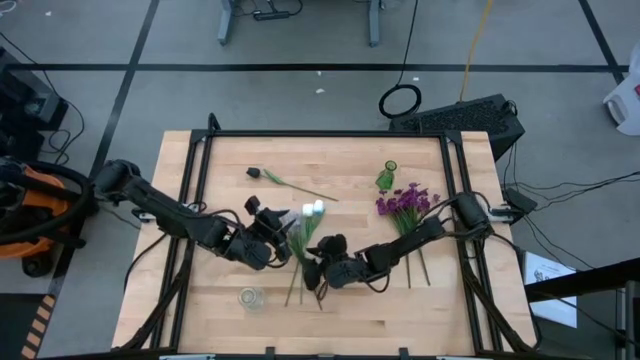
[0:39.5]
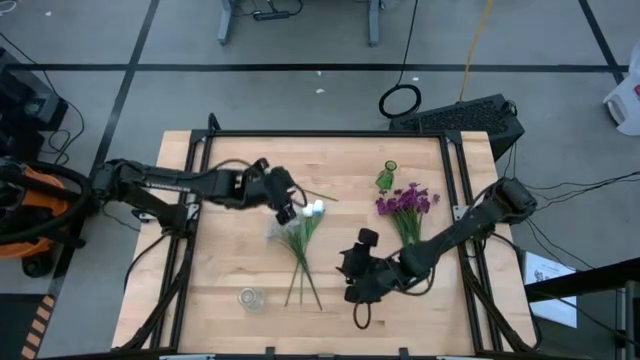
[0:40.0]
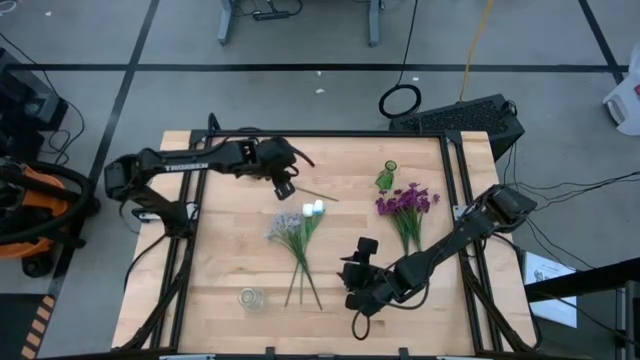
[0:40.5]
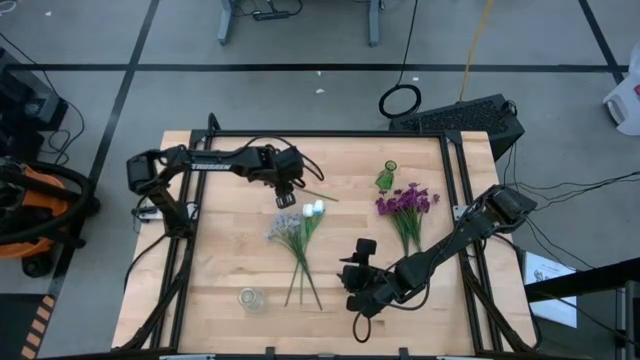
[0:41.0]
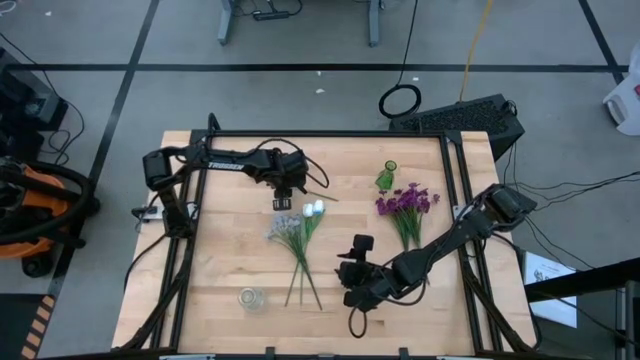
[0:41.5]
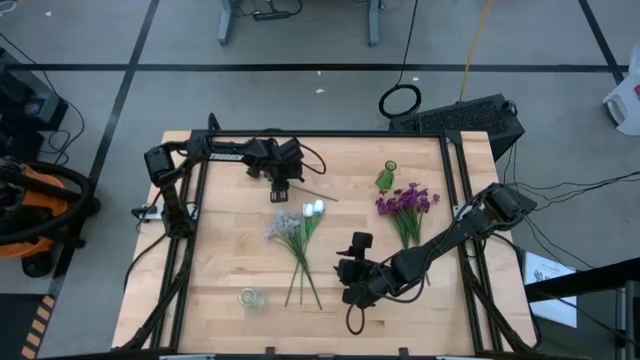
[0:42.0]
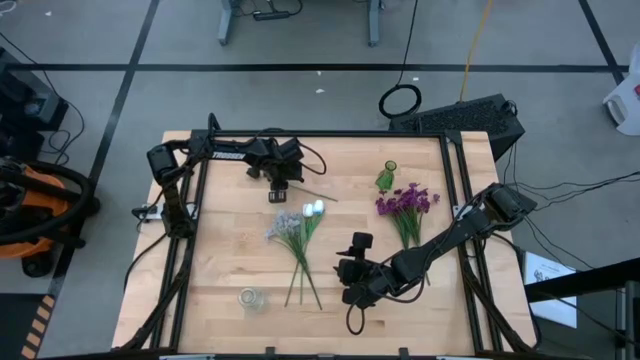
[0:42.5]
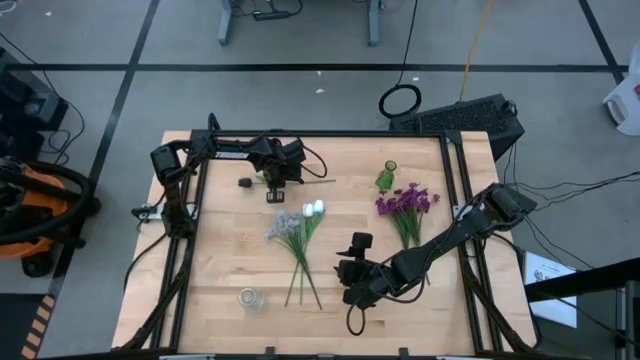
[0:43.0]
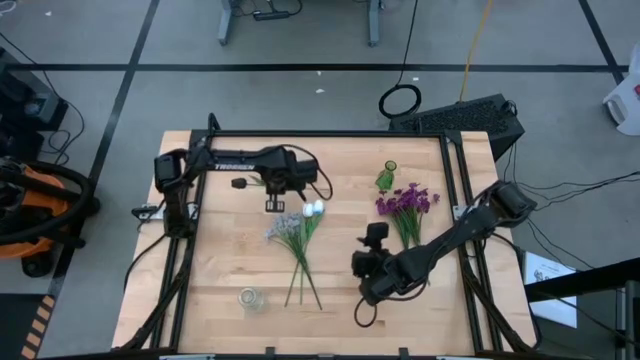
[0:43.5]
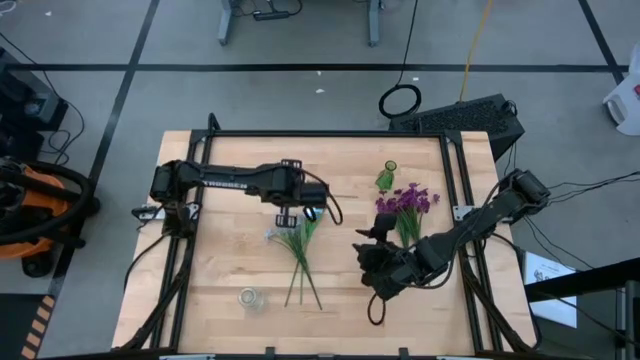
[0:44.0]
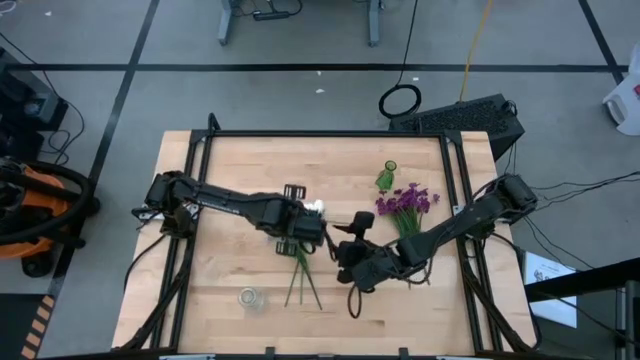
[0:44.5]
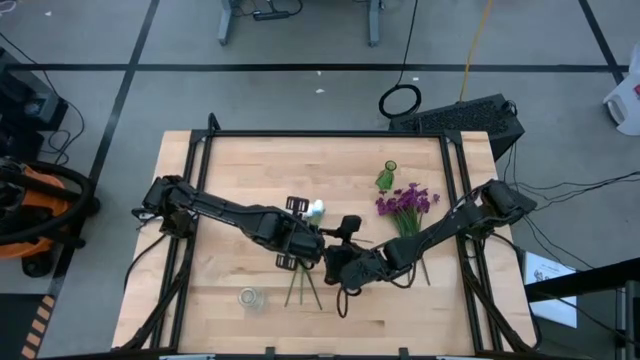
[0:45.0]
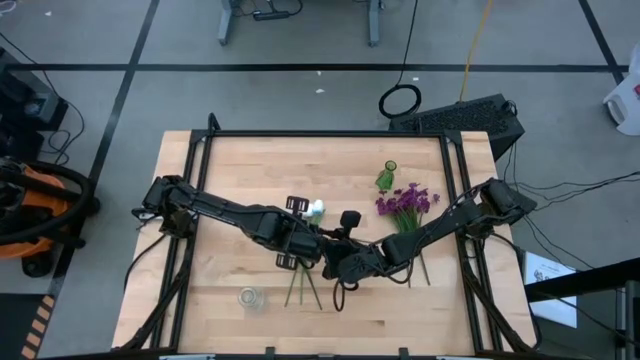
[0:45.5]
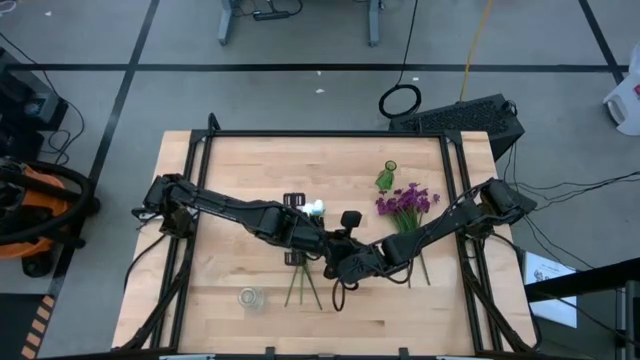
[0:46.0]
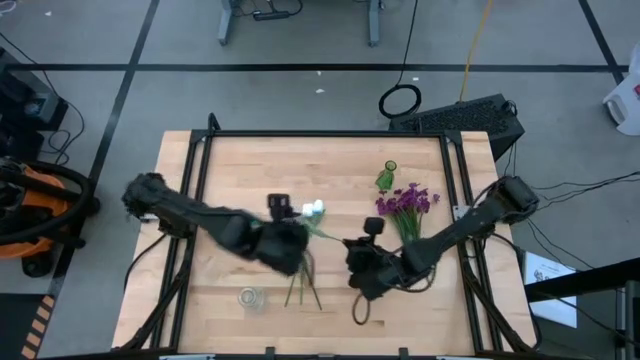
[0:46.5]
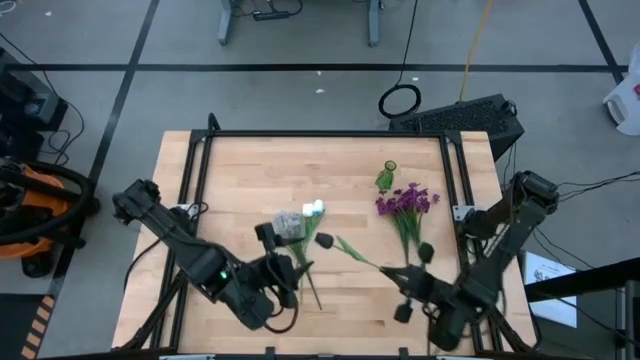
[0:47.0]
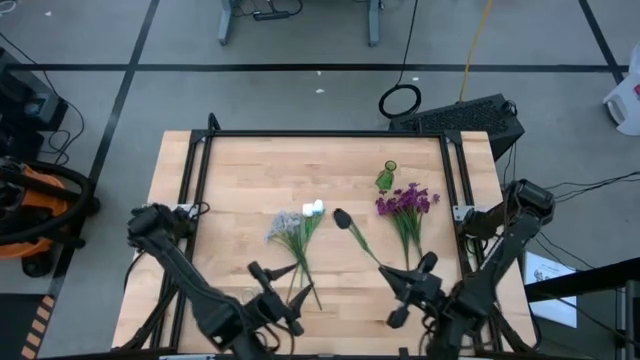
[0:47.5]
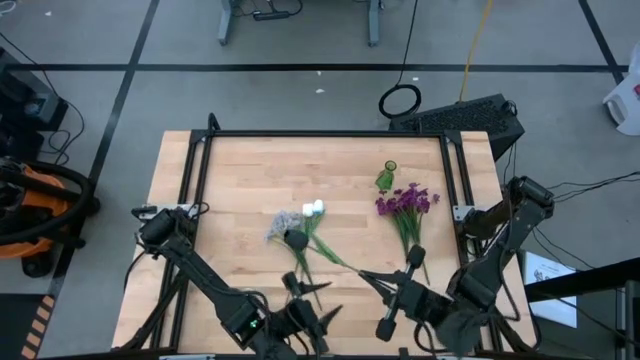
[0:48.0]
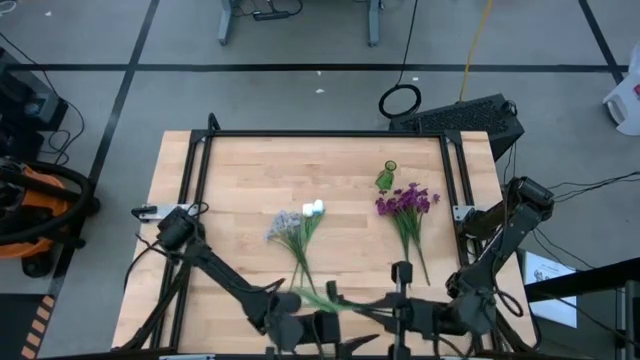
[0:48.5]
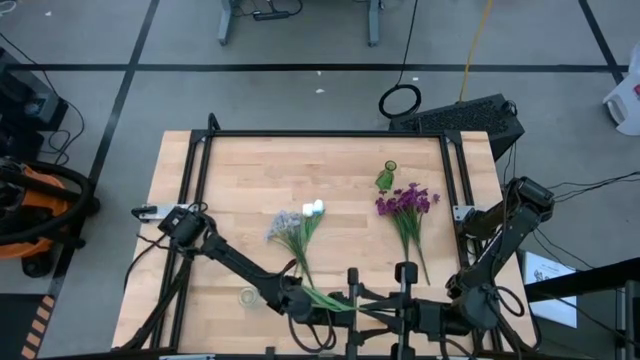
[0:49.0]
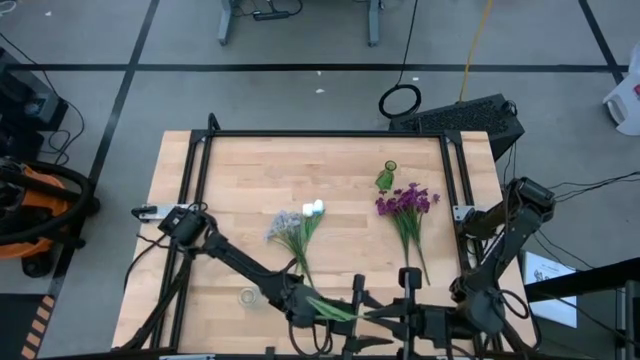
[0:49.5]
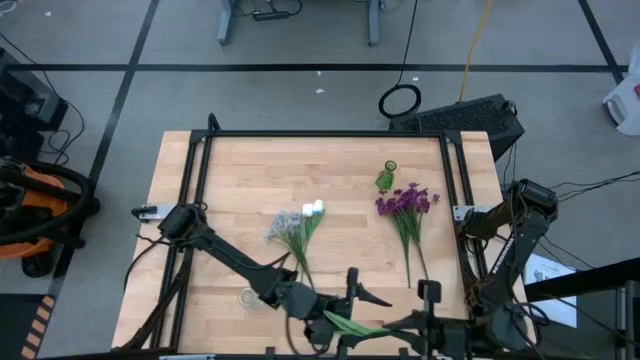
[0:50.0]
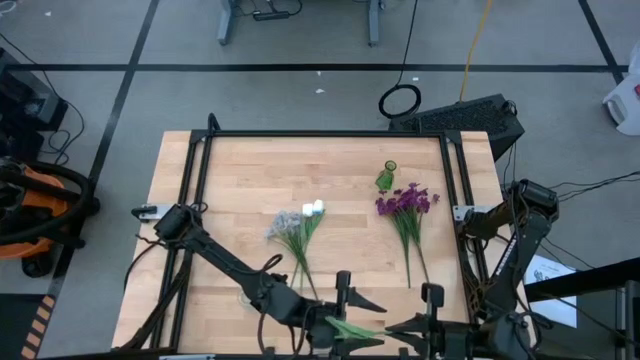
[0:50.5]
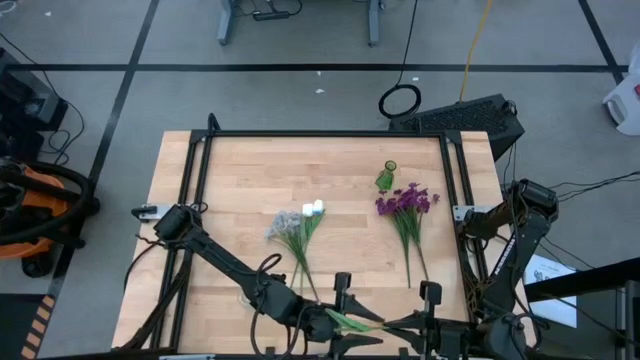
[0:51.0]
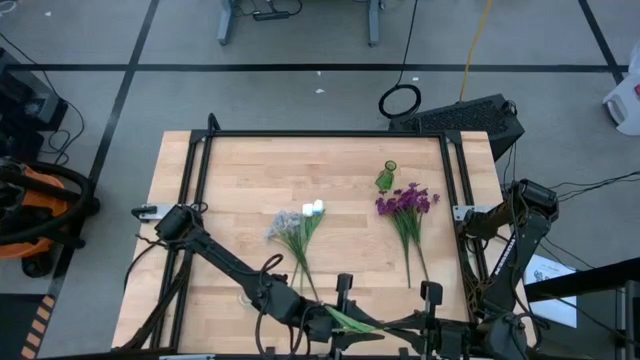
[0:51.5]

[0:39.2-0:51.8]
Task: Sort flowers into vase by color
Put the black flower into the green vase

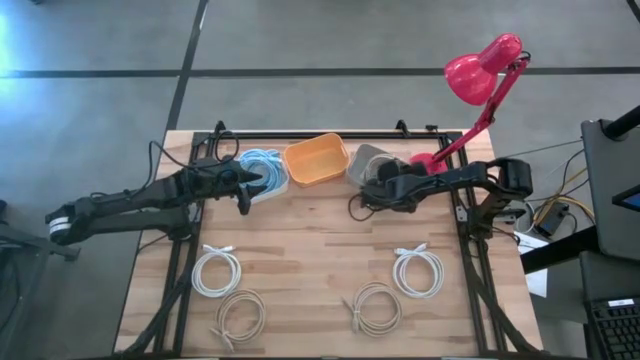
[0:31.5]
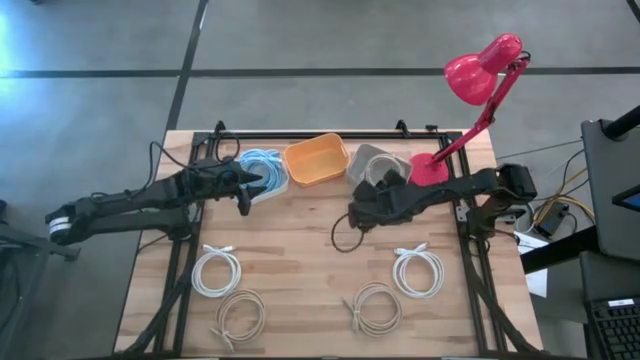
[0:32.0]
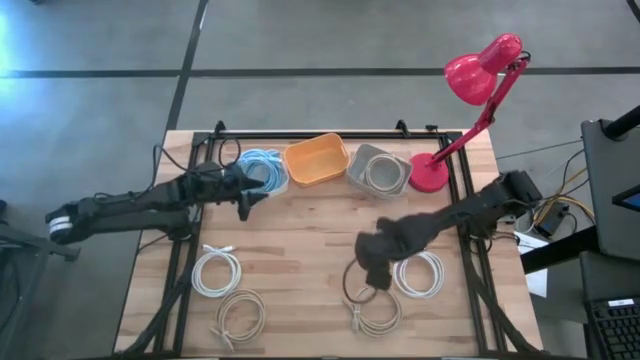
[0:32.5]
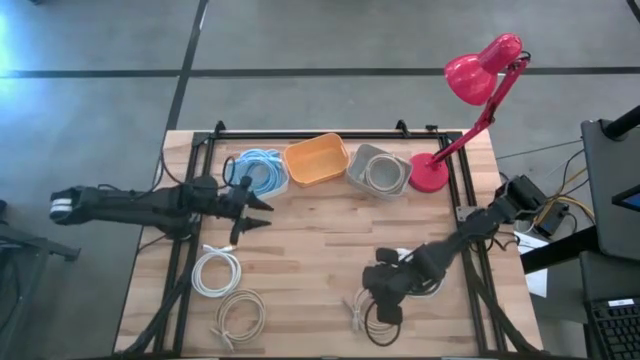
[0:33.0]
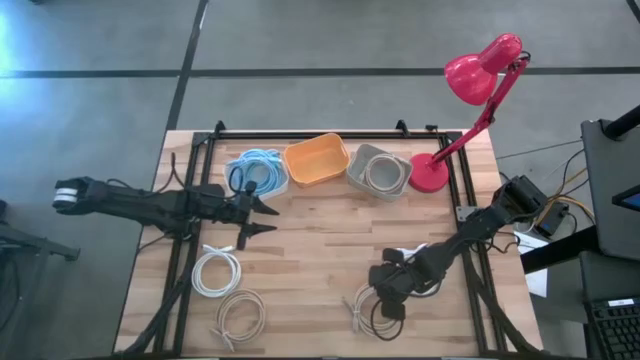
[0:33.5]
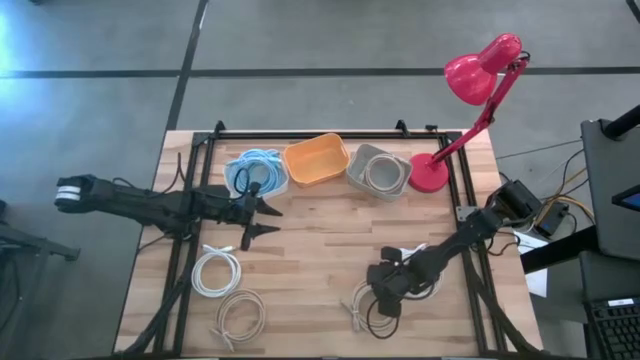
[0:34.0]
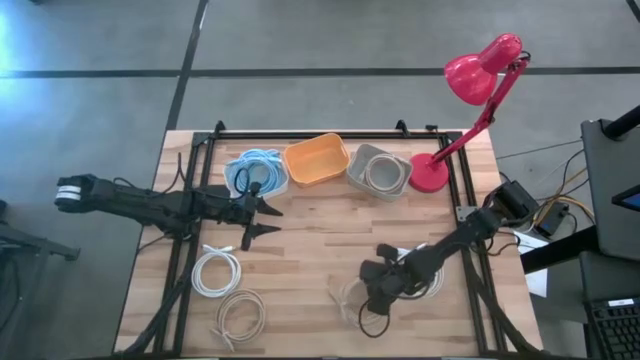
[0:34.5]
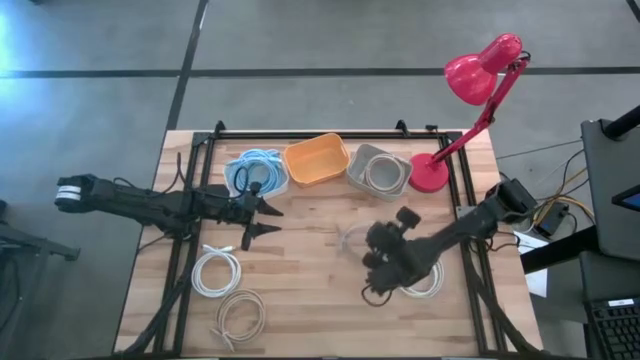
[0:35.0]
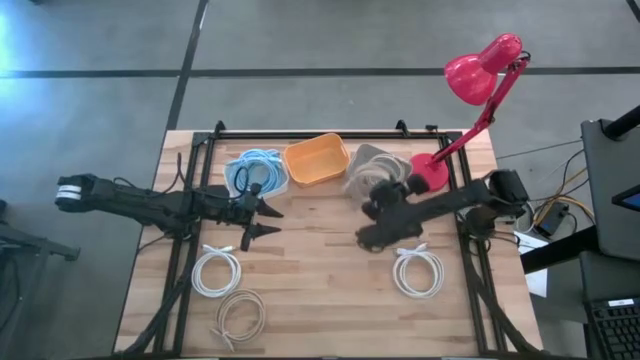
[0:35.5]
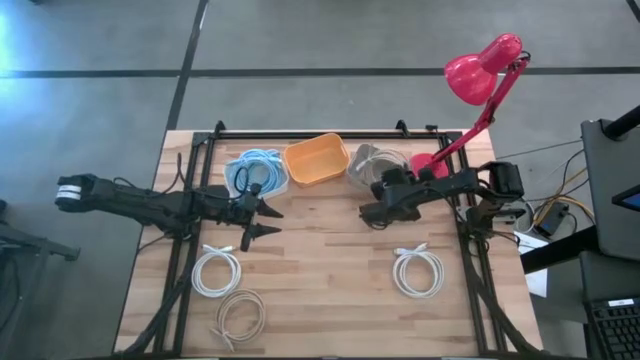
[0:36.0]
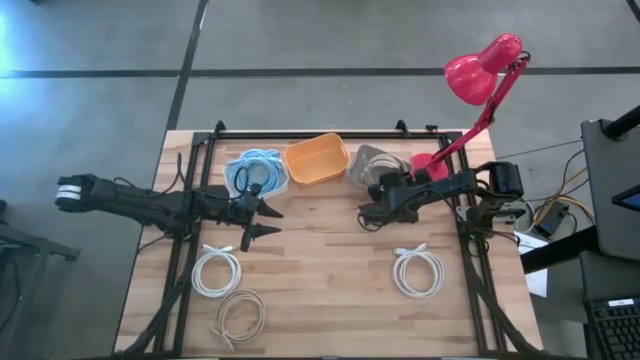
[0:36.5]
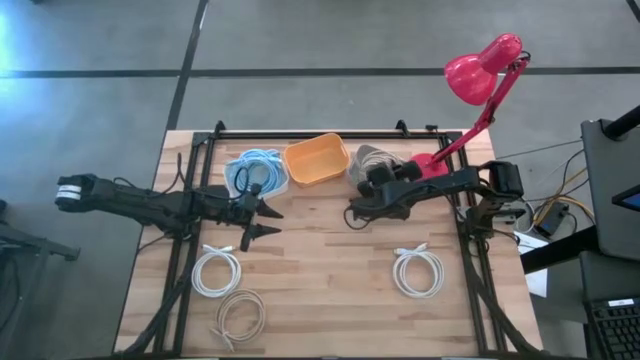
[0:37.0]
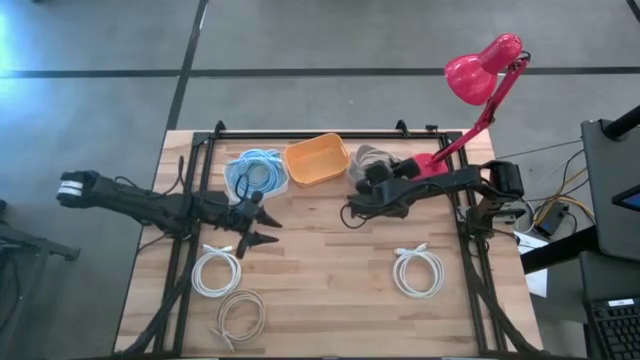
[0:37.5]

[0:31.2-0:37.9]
Task: Pick & Place USB Port
Put the right brown charger cable into the gray bin
